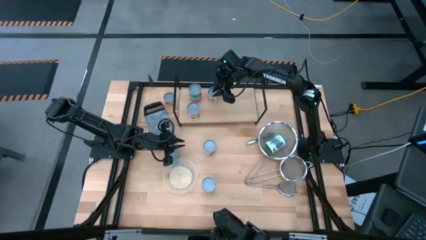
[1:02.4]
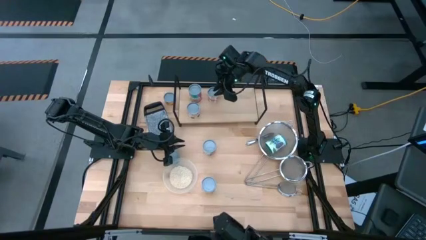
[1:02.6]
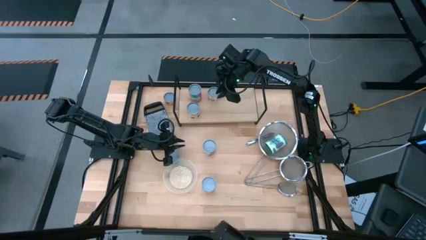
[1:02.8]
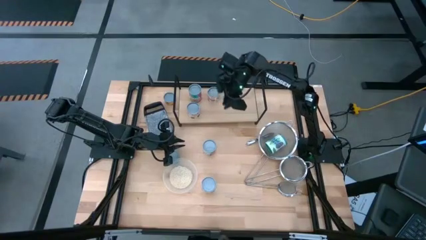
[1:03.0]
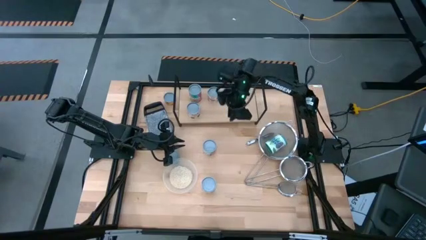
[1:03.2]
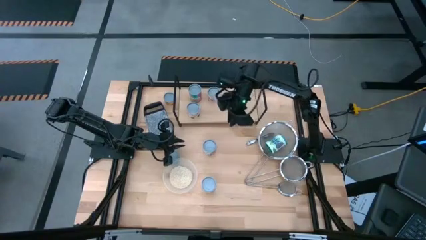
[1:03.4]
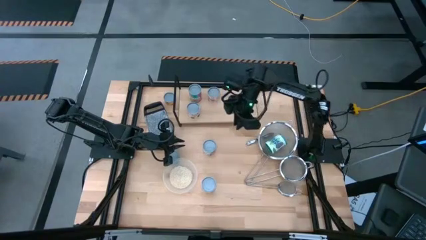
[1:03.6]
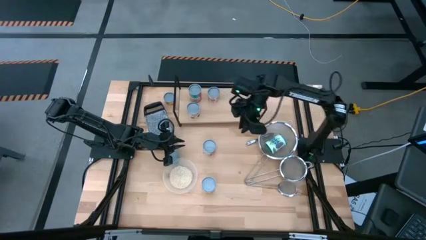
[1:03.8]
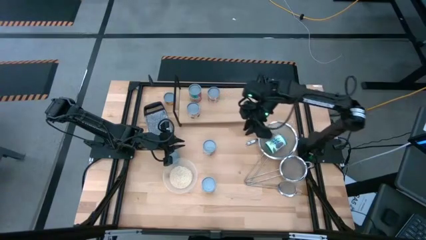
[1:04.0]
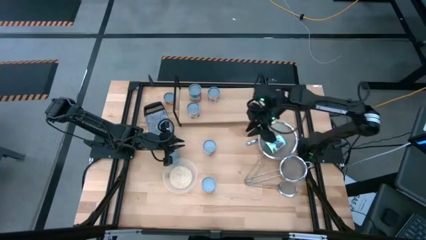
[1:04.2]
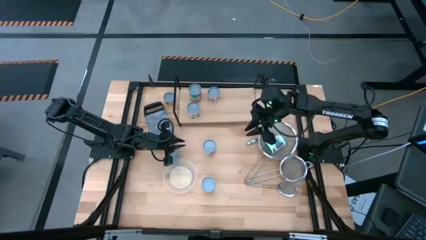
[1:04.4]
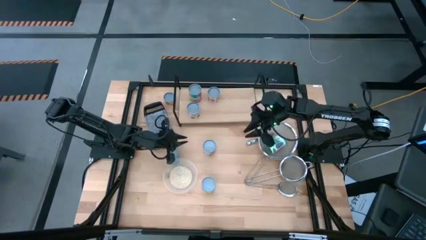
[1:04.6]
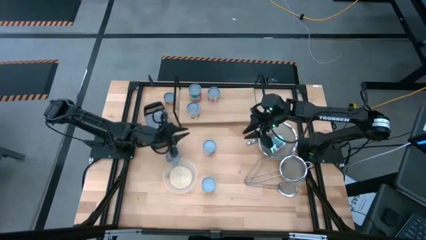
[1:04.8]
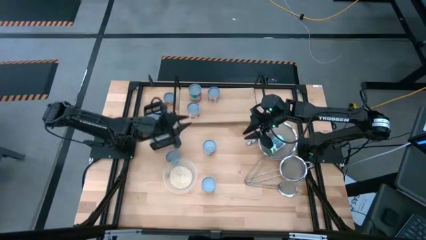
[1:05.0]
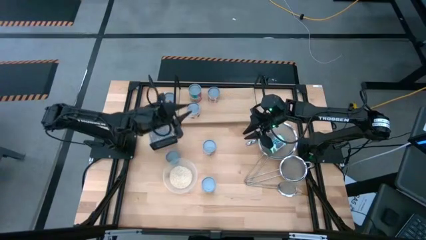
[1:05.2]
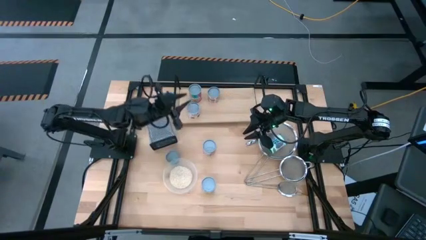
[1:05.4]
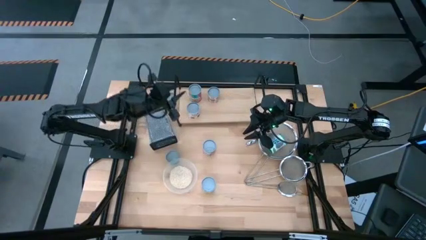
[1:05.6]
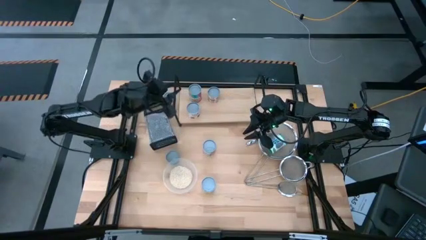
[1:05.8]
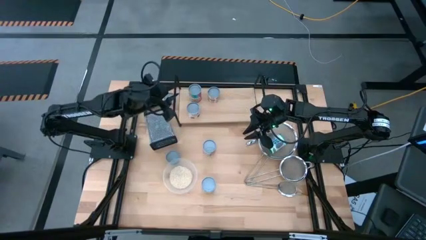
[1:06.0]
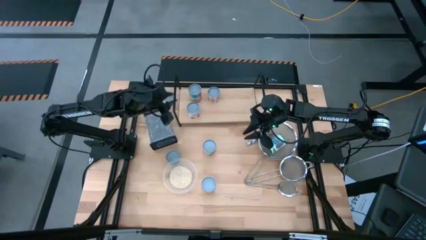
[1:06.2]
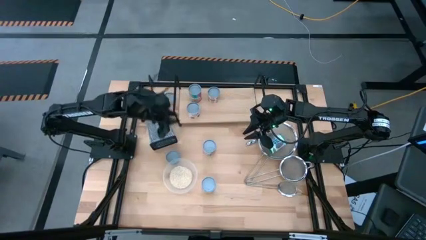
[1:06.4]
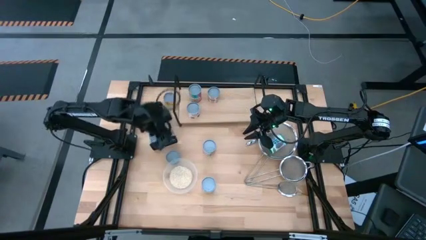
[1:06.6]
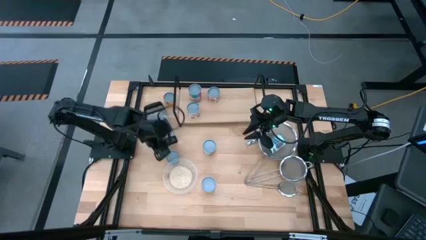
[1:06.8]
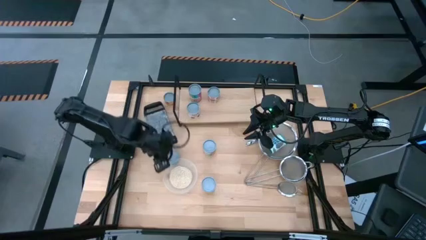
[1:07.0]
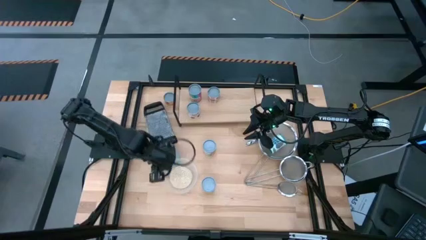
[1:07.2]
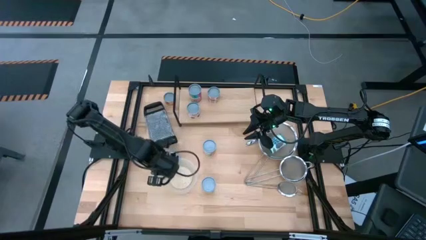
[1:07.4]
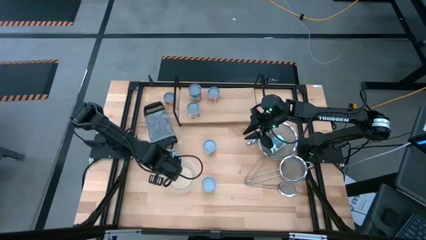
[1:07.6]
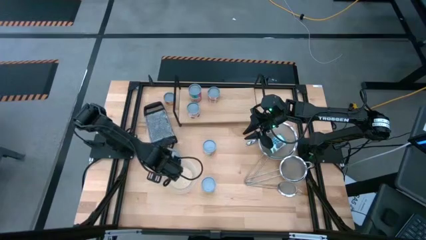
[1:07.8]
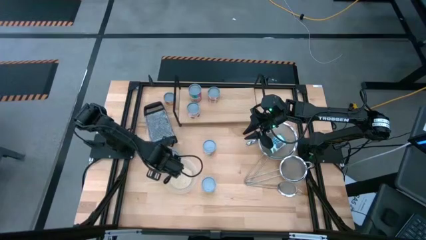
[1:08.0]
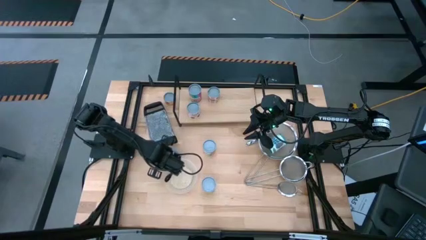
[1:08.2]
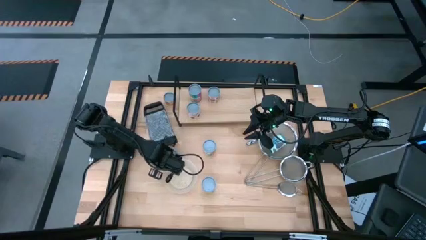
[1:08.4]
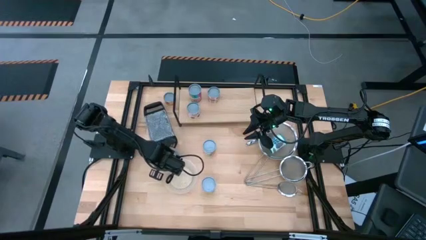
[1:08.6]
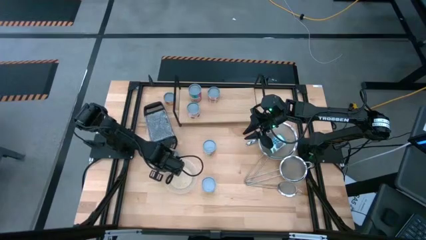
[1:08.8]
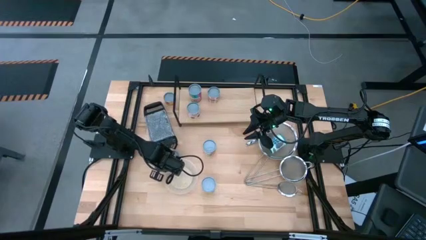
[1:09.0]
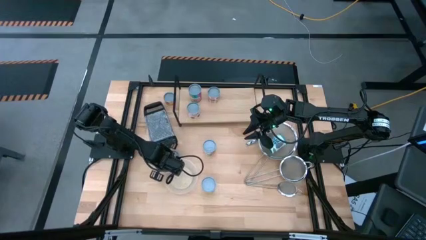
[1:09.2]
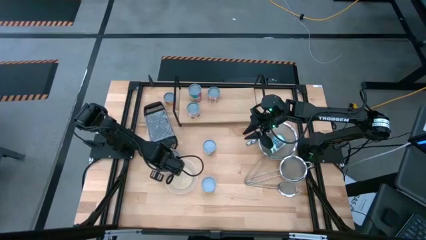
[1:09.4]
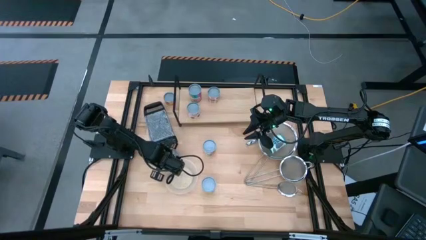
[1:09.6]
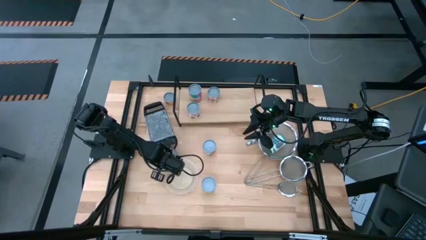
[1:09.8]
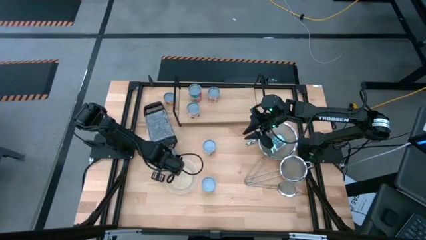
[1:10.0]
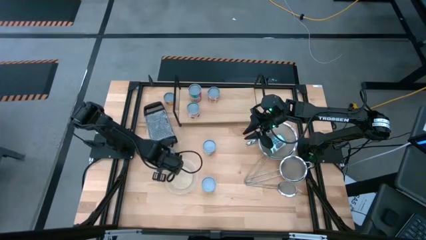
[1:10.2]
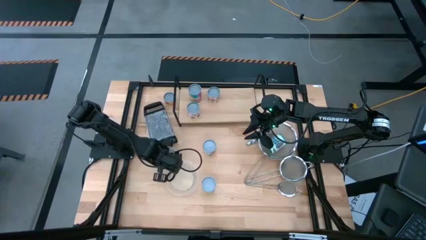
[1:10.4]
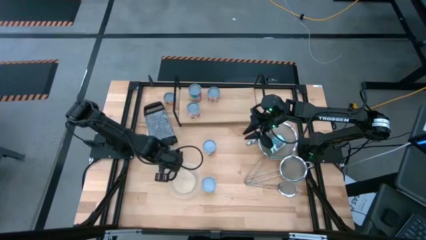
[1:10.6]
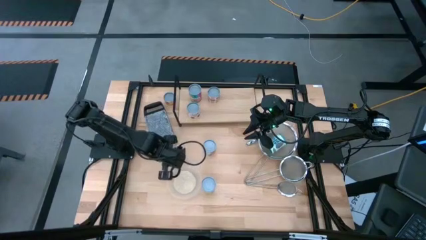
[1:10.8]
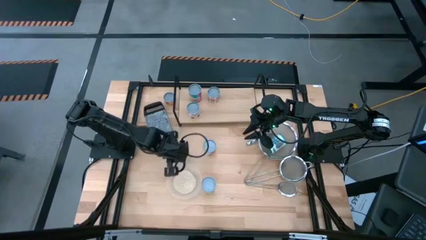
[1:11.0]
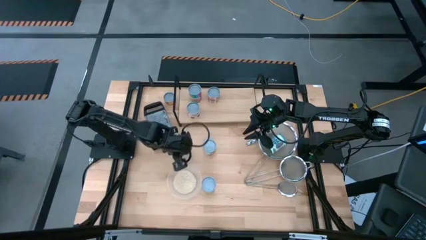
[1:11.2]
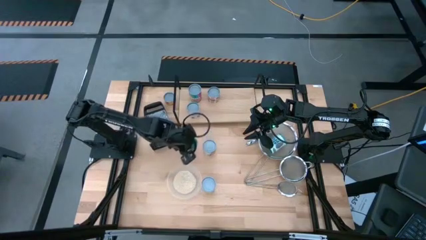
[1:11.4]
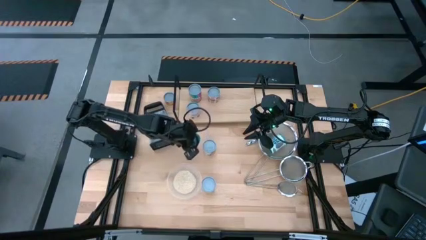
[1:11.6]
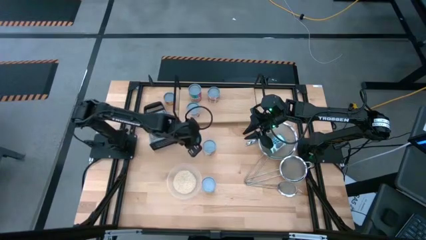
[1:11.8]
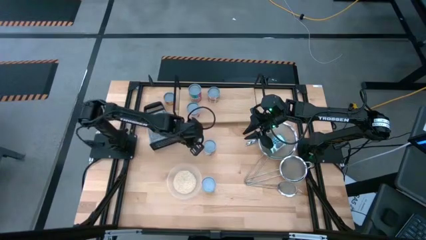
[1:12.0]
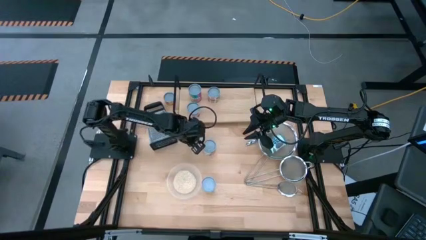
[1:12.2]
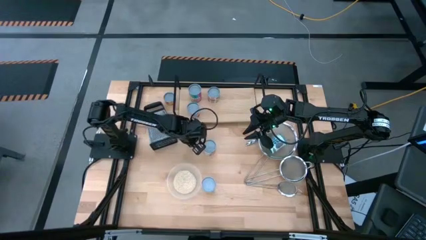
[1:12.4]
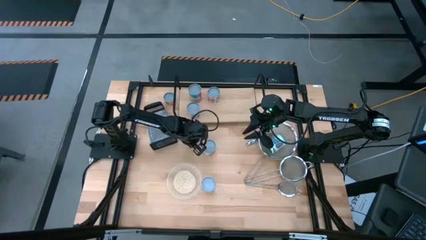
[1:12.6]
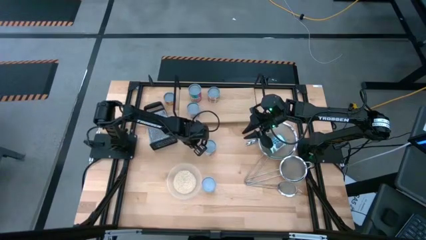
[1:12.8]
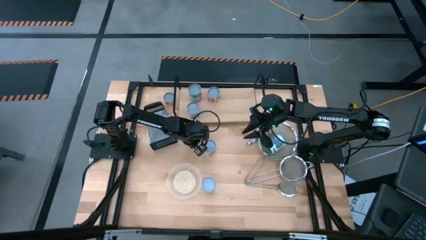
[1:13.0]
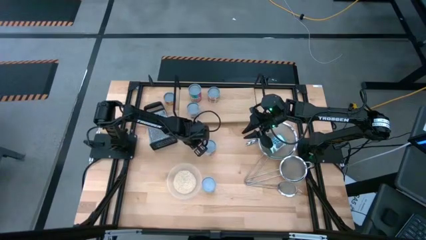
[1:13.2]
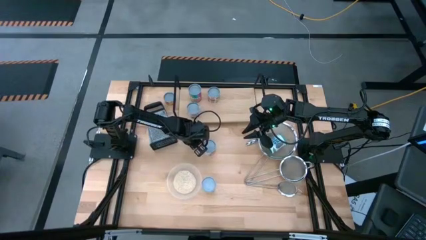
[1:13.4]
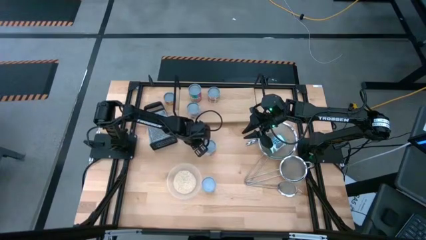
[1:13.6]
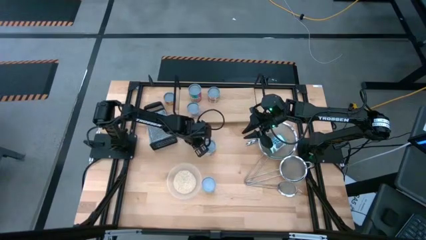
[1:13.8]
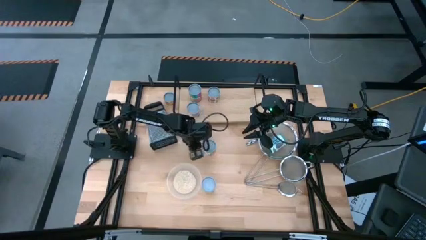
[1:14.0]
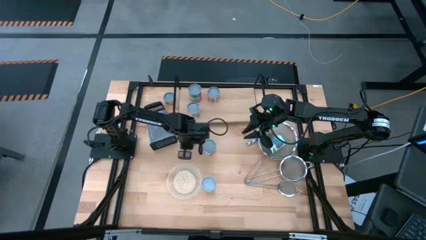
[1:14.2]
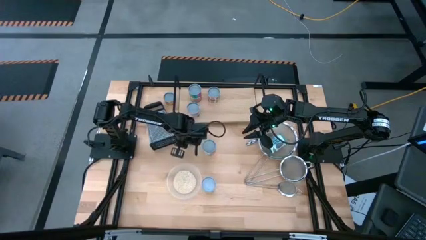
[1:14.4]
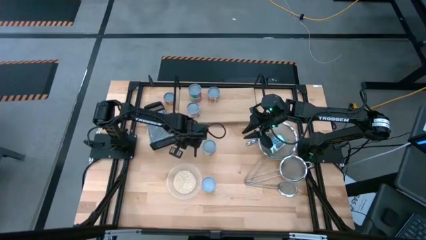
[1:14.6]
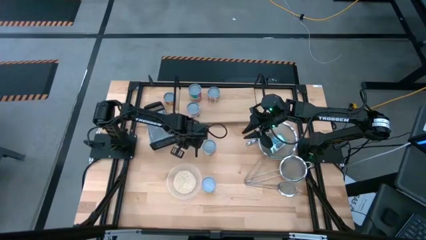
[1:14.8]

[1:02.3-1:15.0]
Task: Pick and place cans onto a shelf
Put the blue tuna fish can on the shelf
